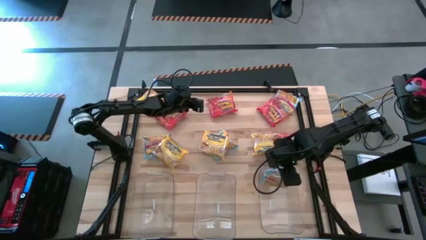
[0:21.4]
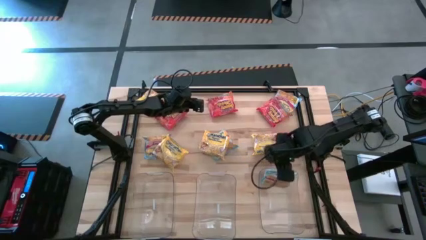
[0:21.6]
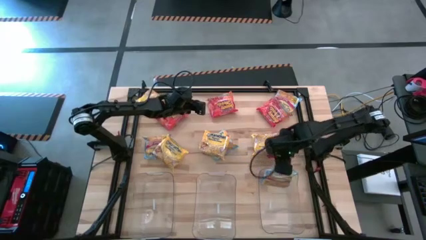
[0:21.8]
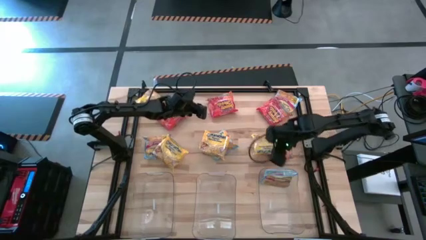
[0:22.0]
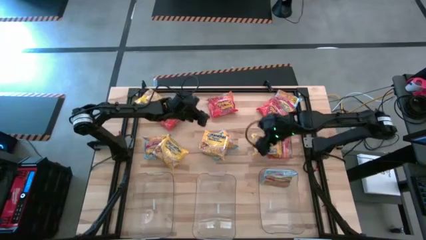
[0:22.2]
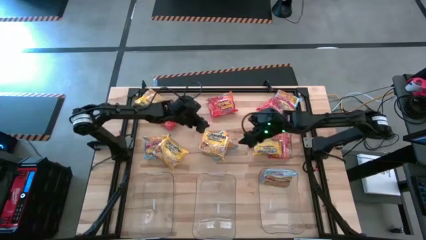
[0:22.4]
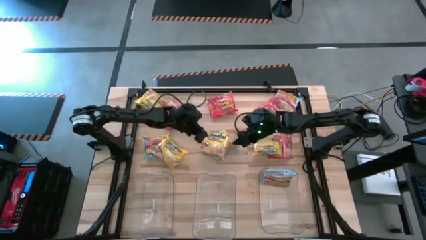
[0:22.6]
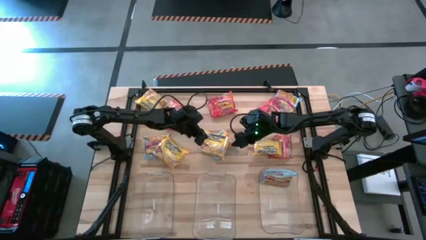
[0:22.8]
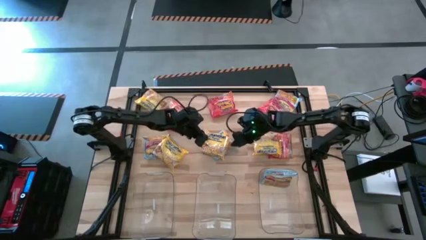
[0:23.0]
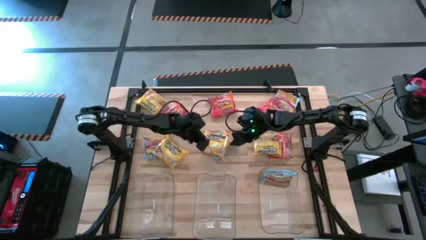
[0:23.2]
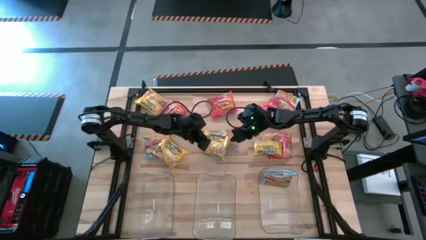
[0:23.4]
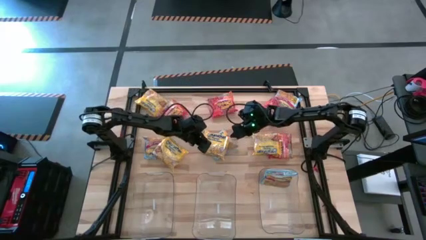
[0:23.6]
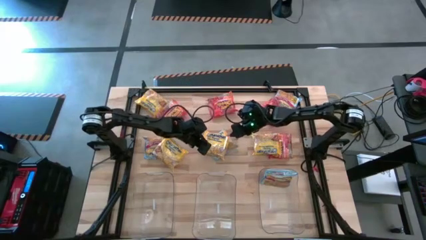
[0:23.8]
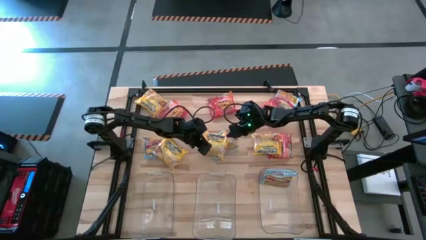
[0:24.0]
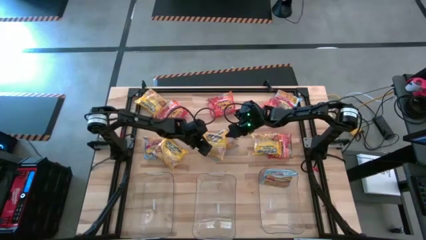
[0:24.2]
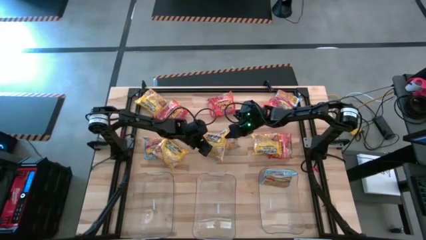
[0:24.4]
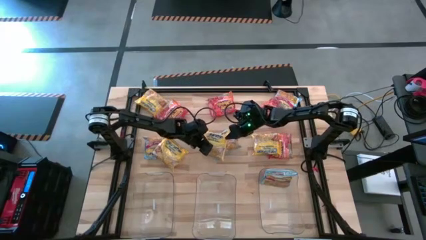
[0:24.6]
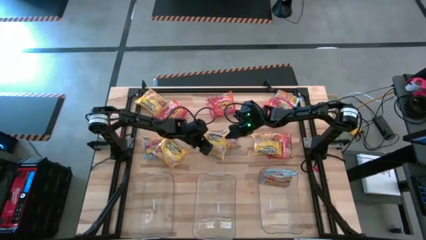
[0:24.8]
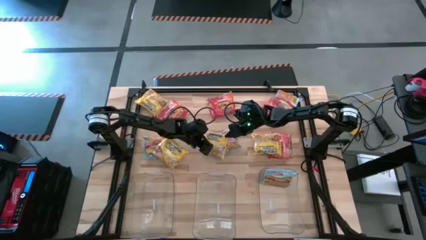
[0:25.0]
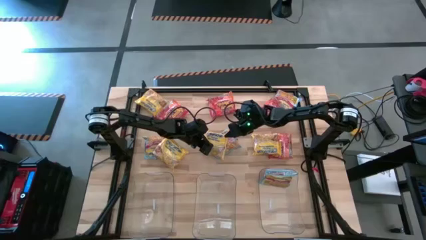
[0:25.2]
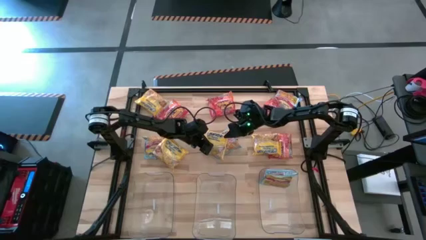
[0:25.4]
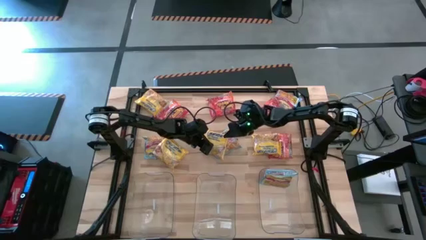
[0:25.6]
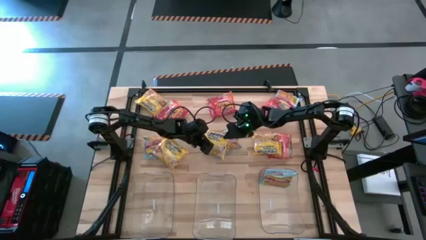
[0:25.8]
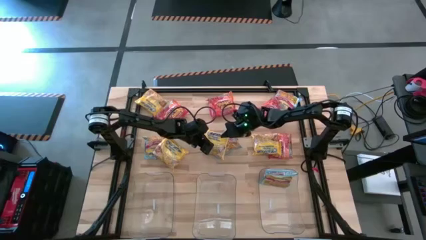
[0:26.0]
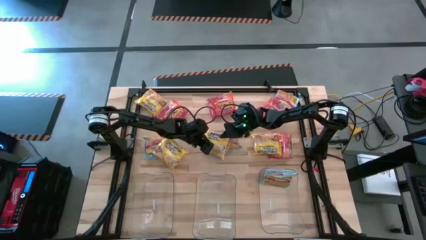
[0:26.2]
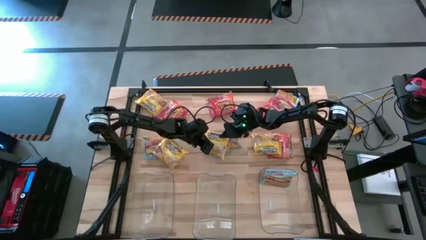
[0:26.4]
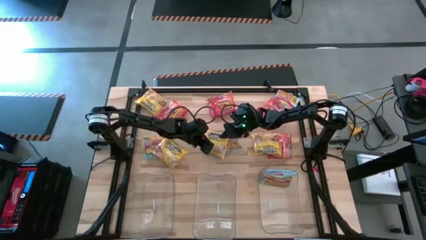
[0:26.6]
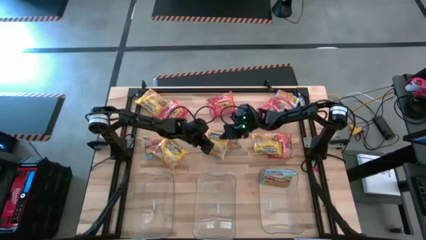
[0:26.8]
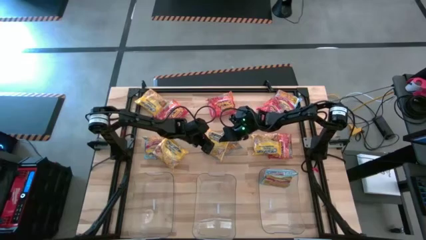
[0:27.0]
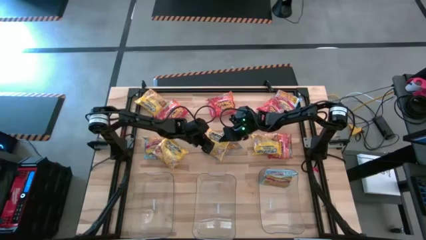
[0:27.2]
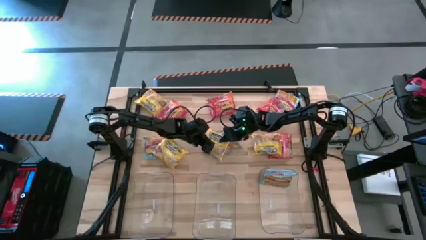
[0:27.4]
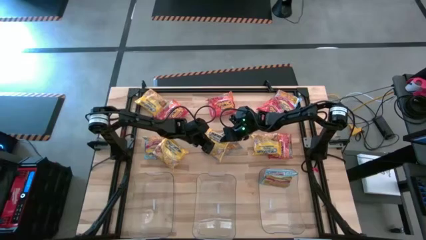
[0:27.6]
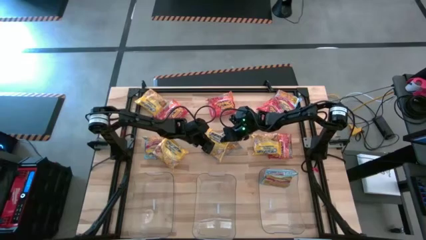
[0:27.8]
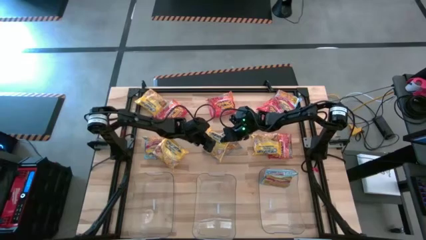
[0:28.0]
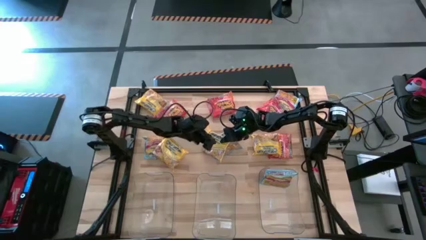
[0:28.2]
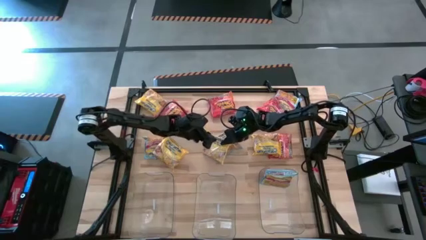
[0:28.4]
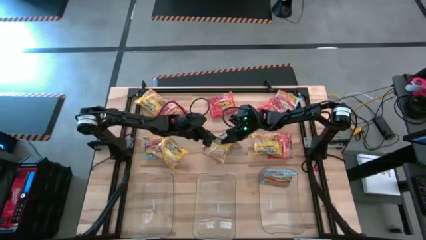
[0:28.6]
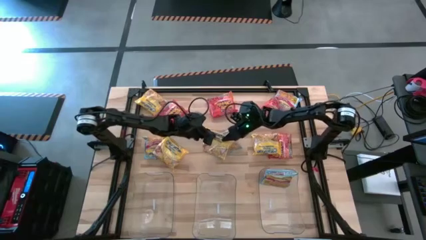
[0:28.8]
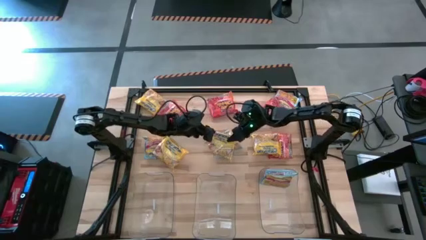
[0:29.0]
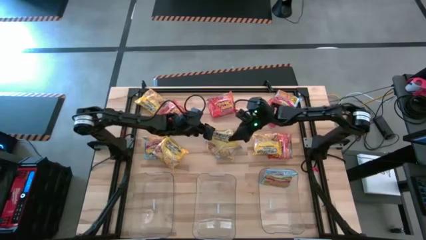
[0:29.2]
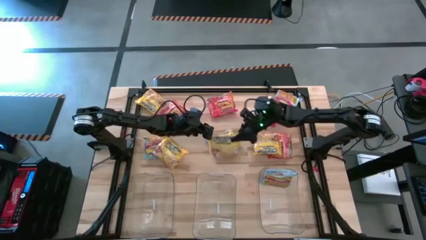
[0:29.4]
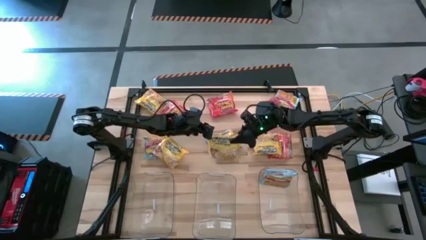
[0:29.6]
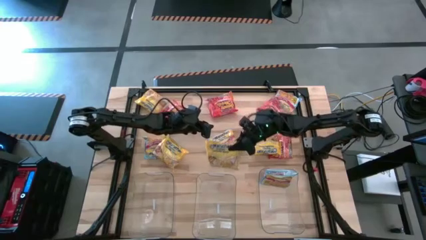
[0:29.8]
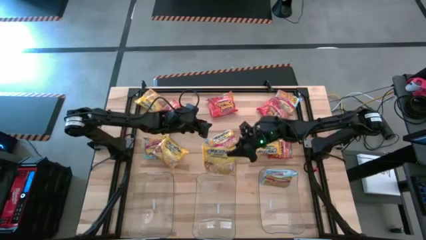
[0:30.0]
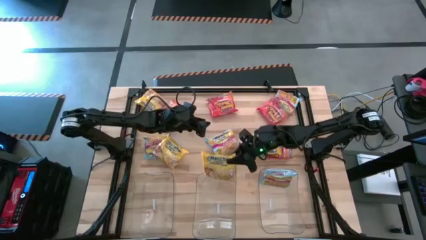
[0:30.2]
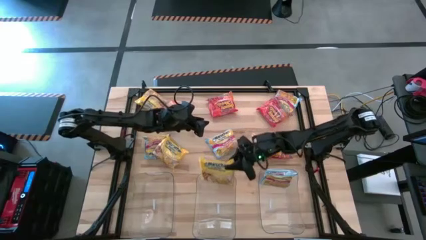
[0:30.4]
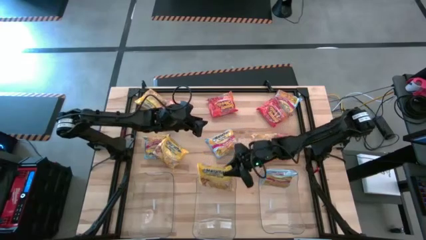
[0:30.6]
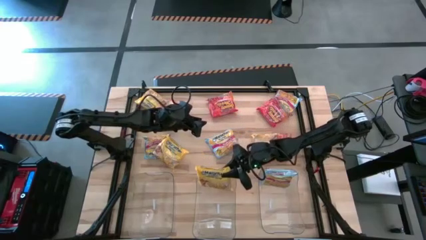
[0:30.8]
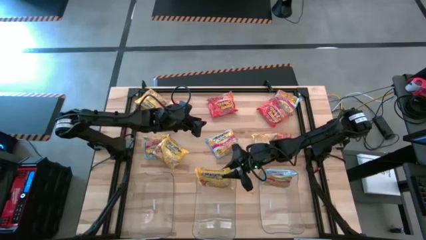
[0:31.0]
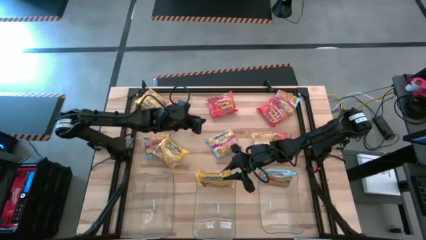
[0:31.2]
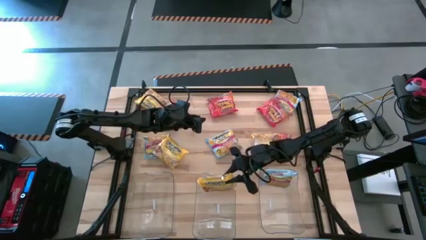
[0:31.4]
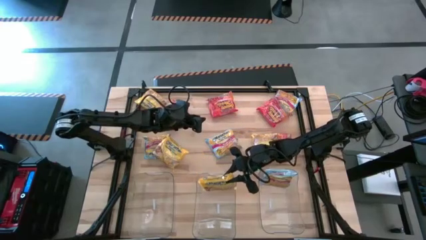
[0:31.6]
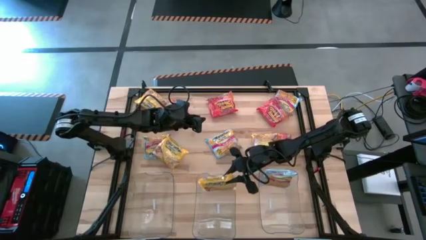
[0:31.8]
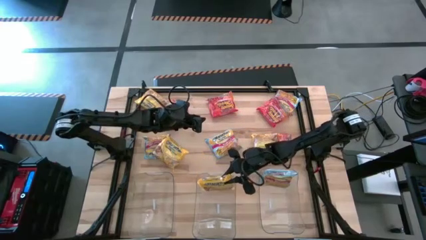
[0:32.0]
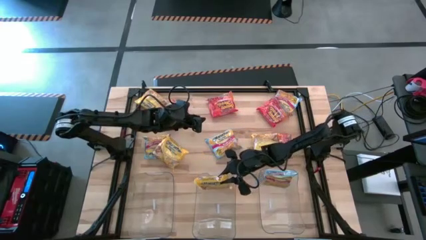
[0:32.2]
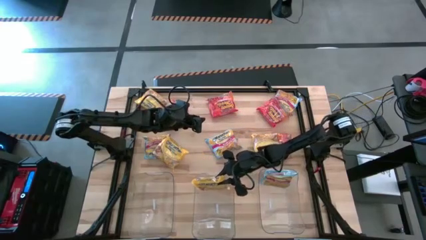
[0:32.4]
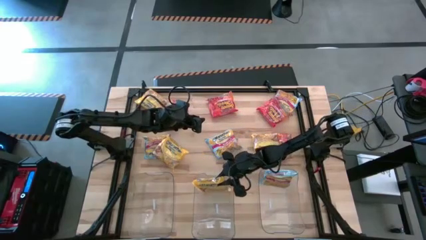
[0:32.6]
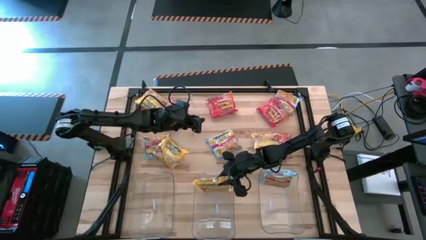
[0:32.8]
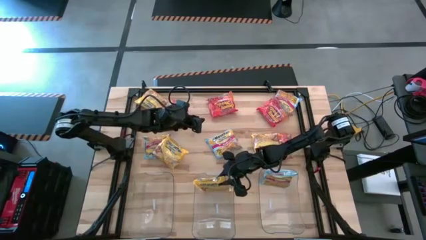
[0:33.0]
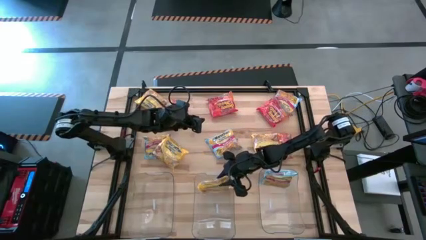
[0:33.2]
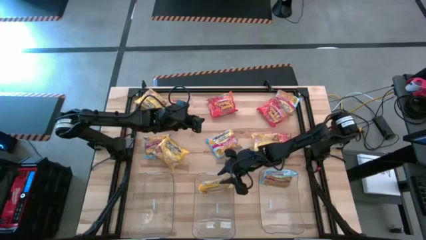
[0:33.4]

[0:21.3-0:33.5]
Task: Sort Maruchan noodles
Put the yellow noodle pack into the middle transparent bin
